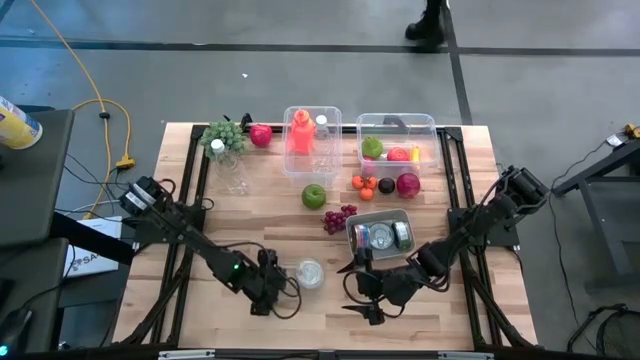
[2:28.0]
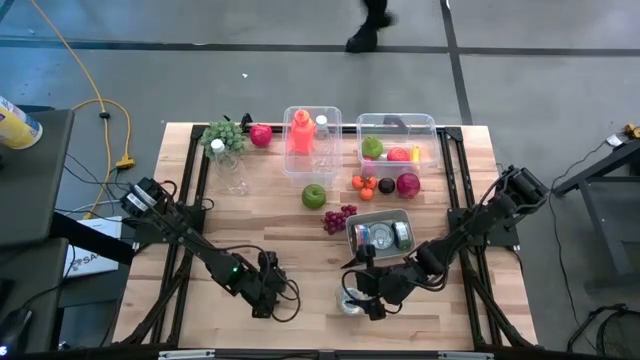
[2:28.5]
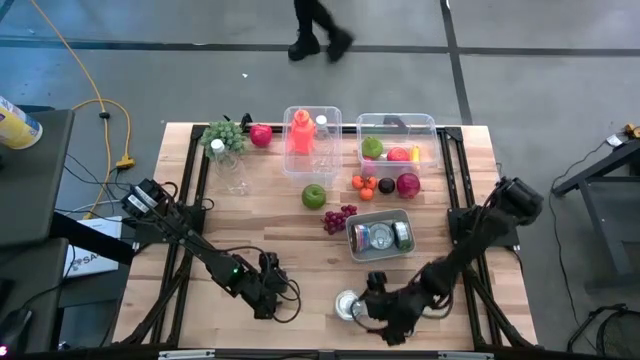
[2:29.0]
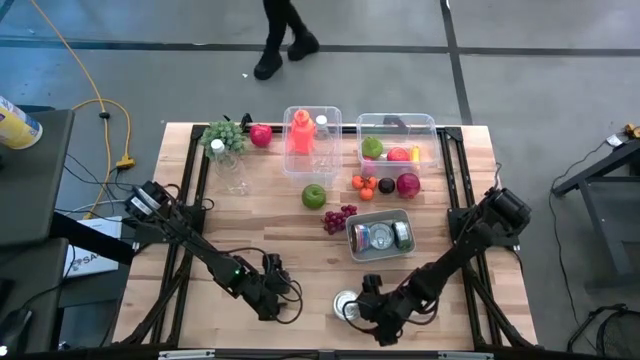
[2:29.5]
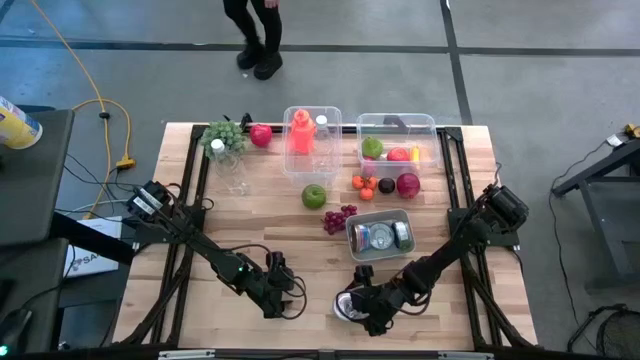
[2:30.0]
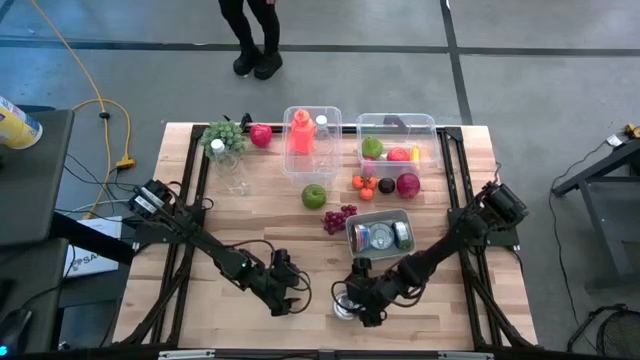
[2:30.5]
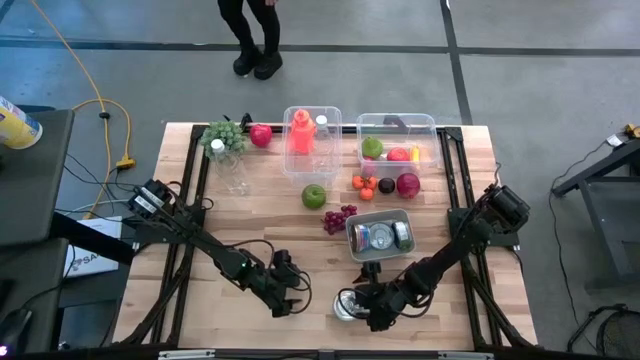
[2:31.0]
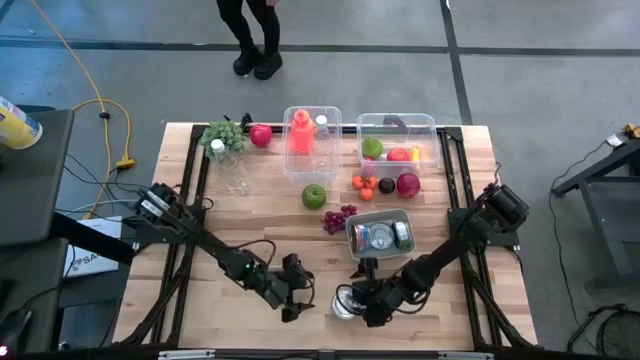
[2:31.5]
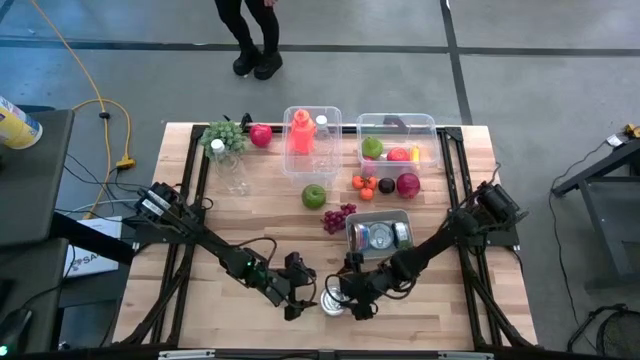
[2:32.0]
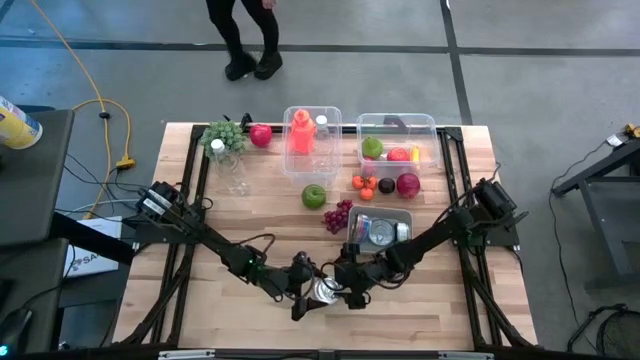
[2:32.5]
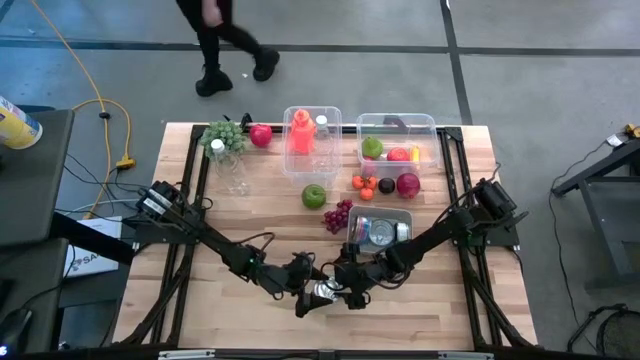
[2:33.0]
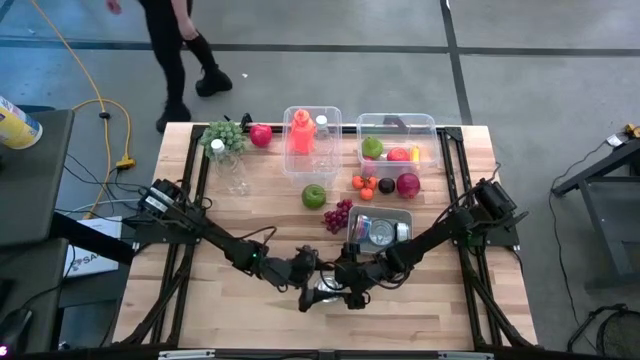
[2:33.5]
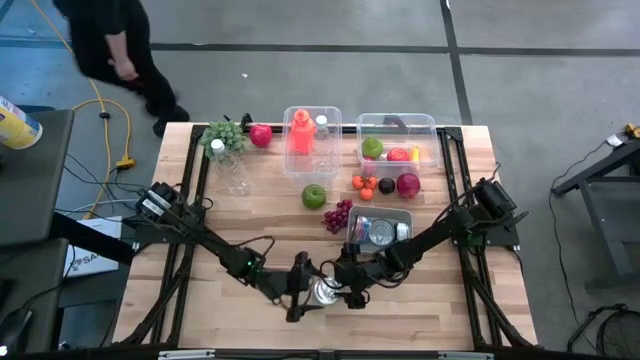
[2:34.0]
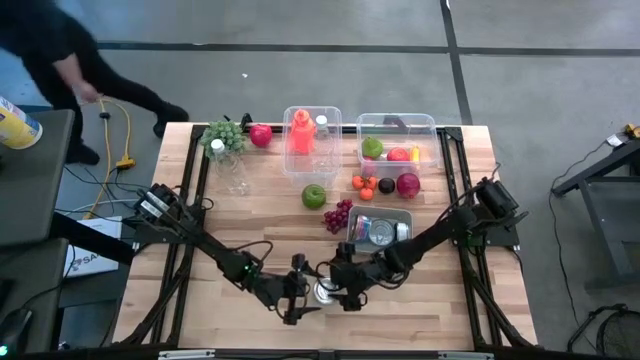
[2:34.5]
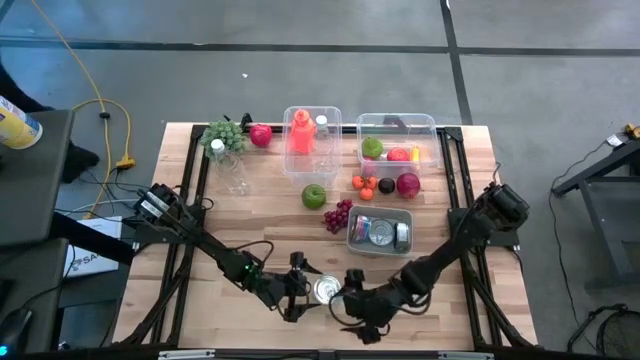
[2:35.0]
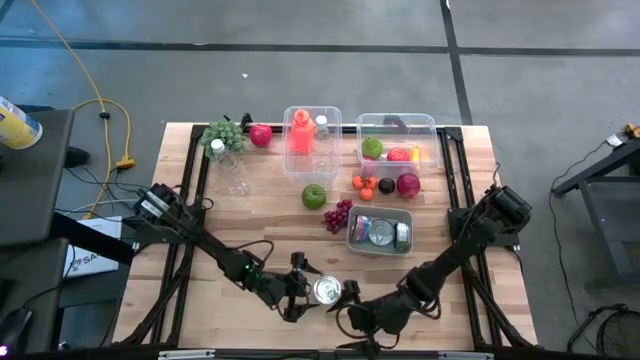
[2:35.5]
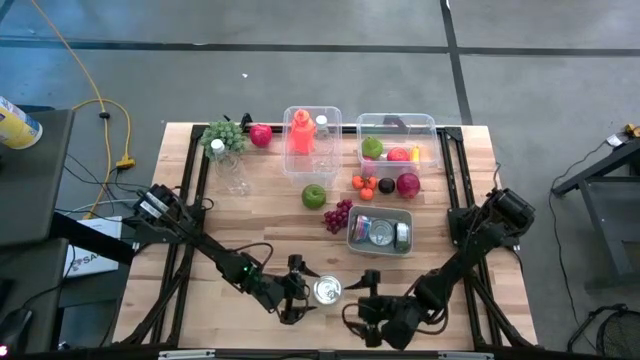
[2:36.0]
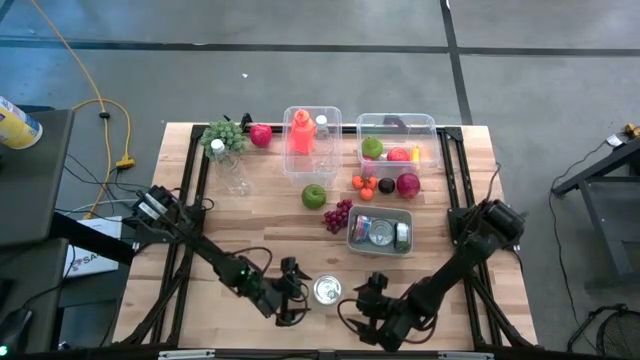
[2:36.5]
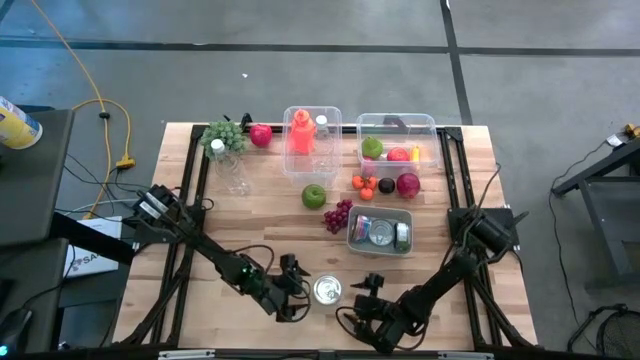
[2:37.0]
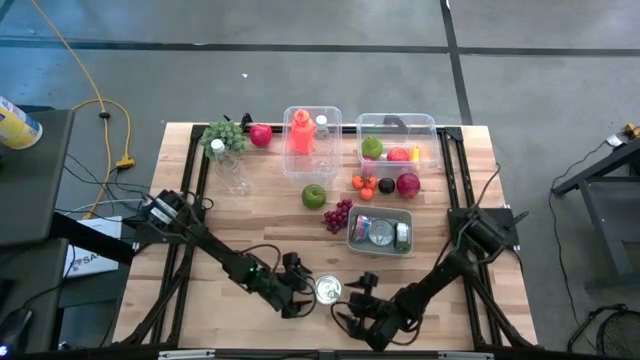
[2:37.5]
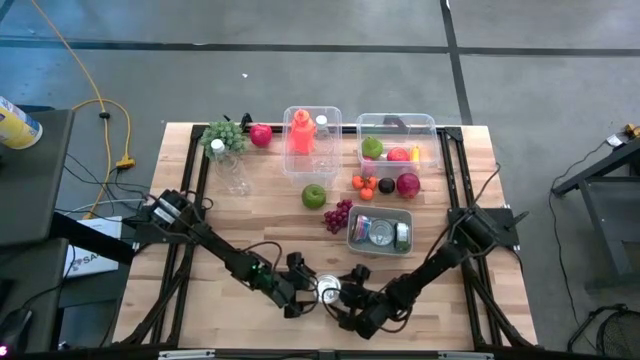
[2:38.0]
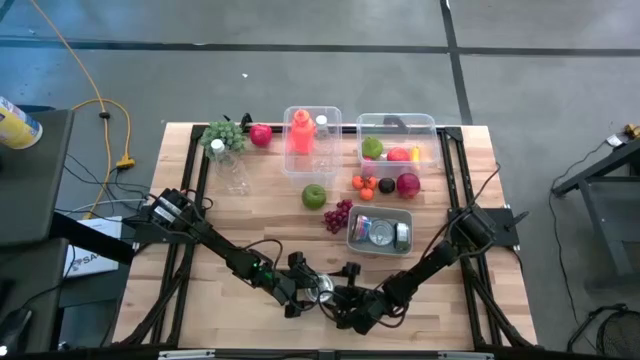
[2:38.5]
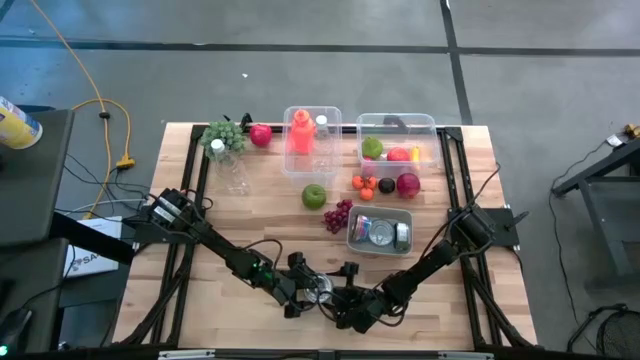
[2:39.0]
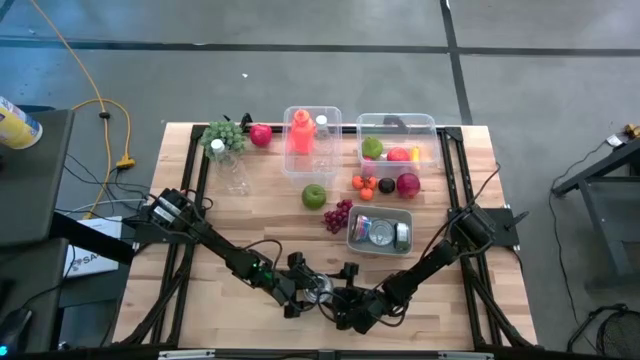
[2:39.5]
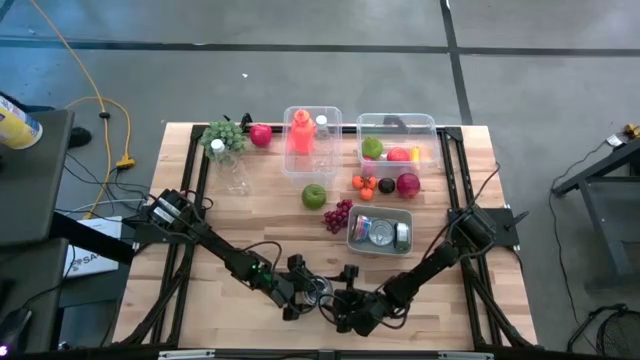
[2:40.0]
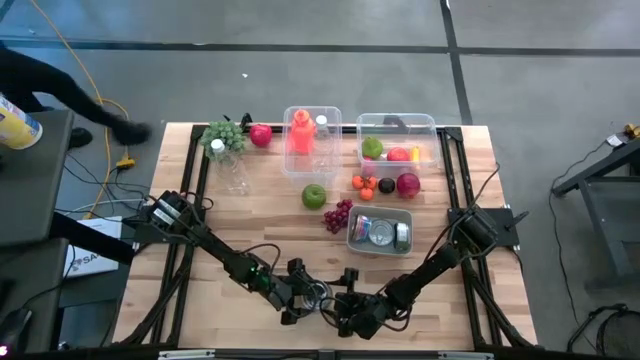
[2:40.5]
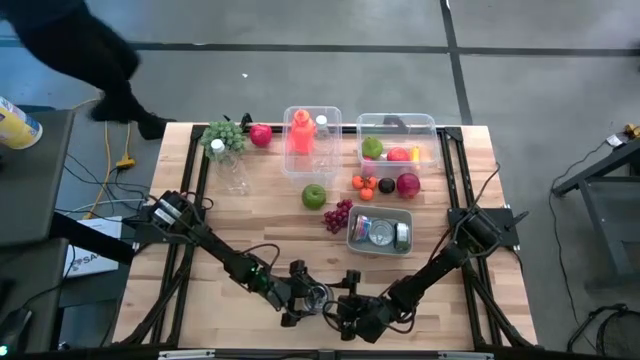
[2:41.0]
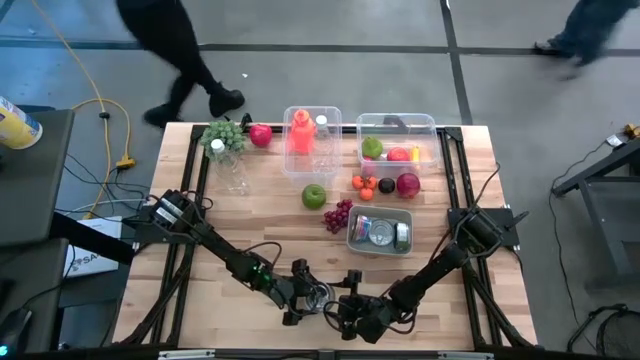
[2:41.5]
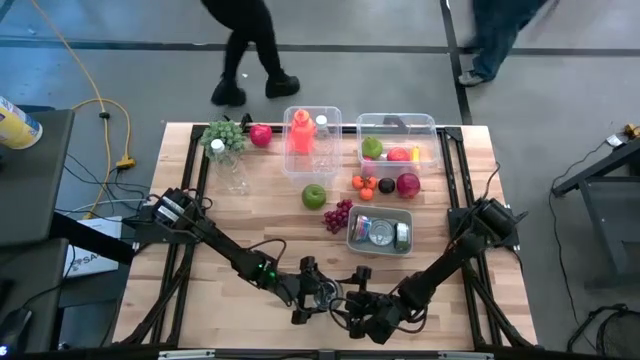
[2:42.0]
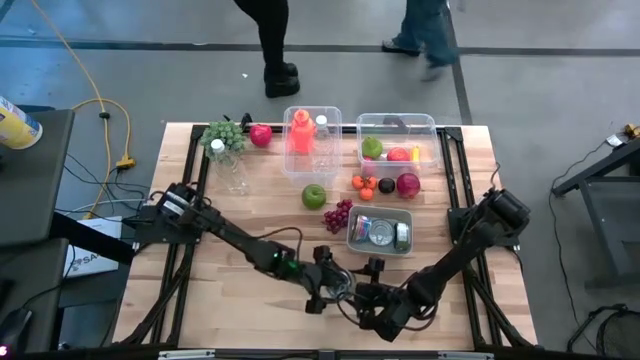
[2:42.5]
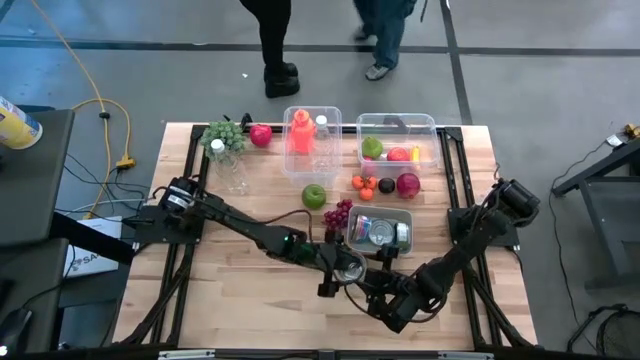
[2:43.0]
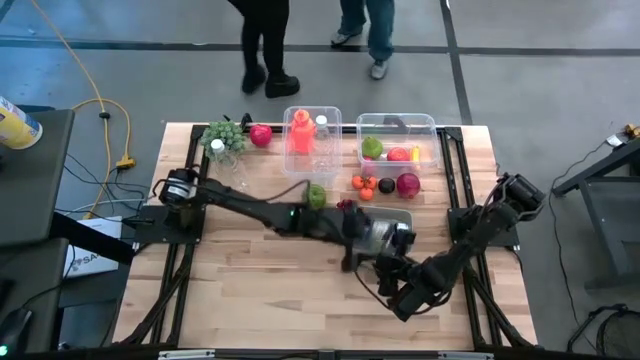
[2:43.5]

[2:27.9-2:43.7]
Task: Pick & Place Food Item
Put the green tuna can into the gray bin

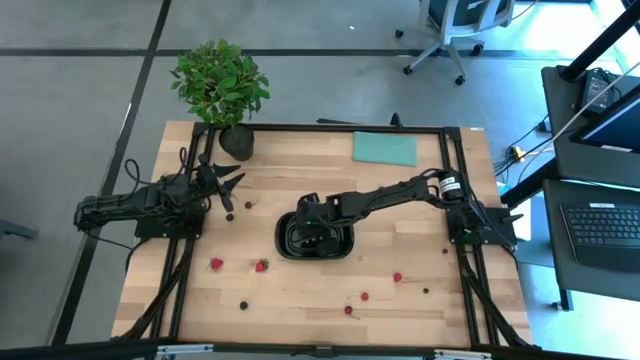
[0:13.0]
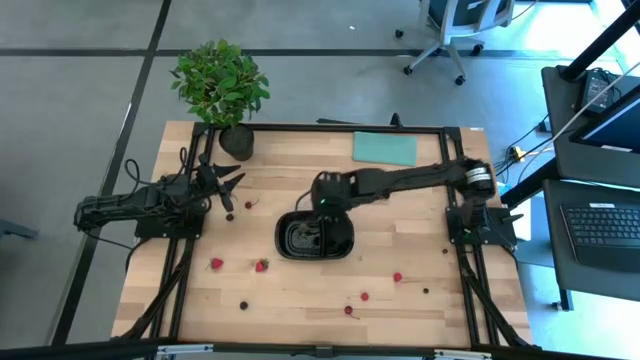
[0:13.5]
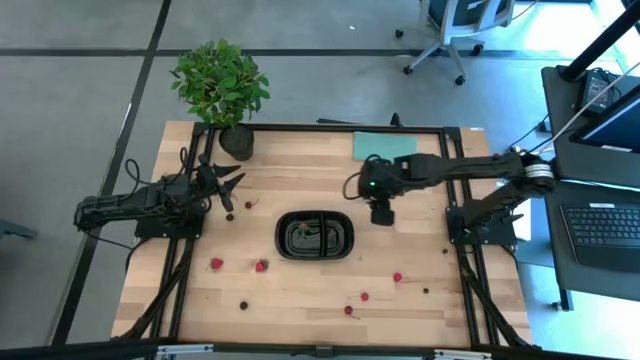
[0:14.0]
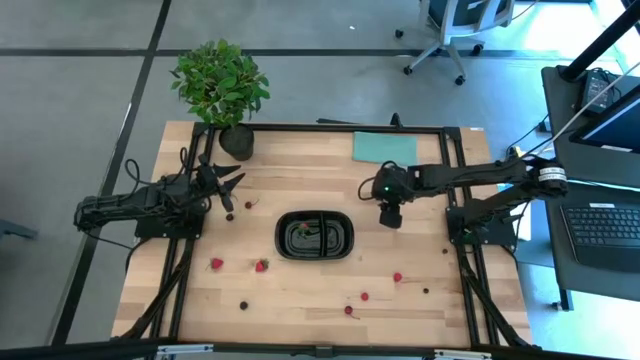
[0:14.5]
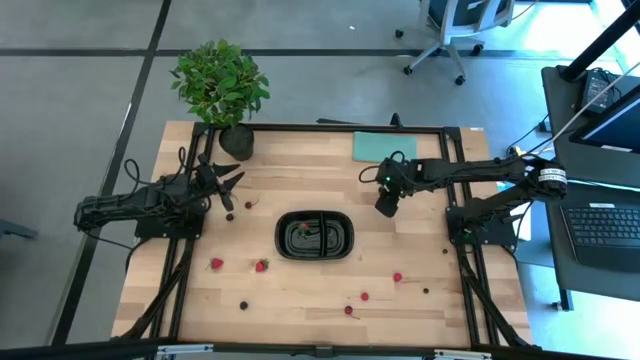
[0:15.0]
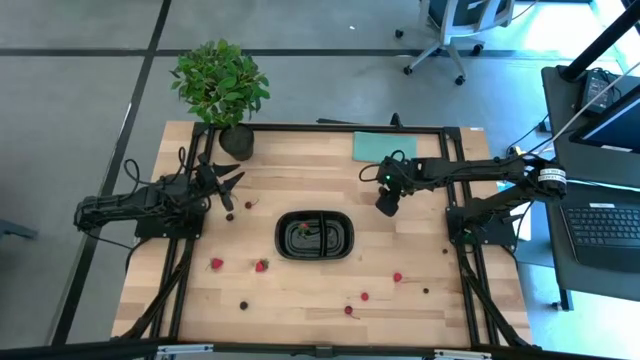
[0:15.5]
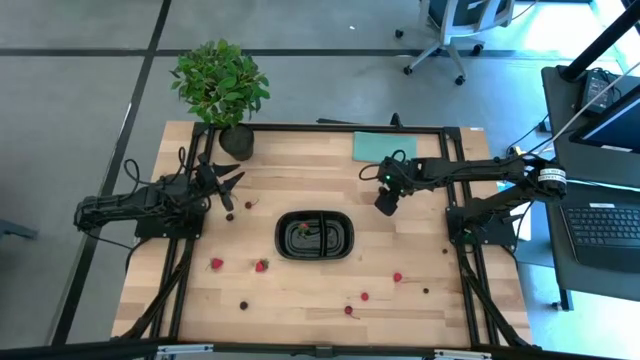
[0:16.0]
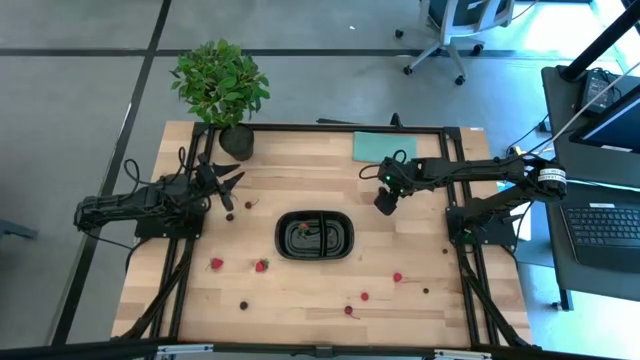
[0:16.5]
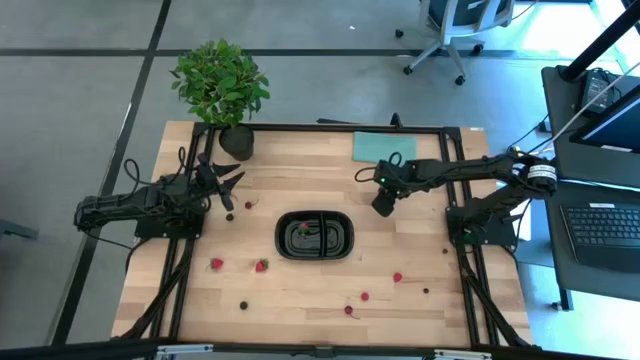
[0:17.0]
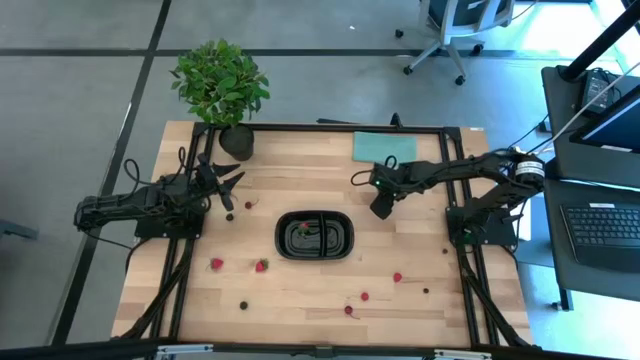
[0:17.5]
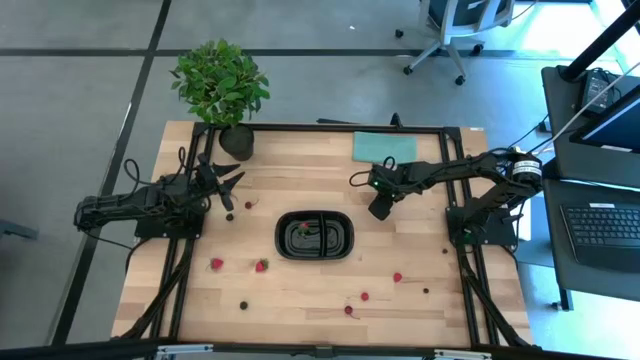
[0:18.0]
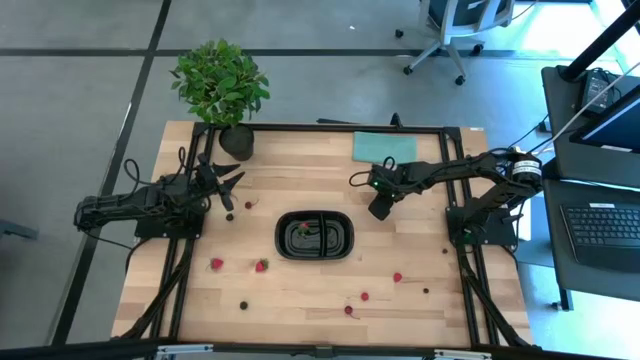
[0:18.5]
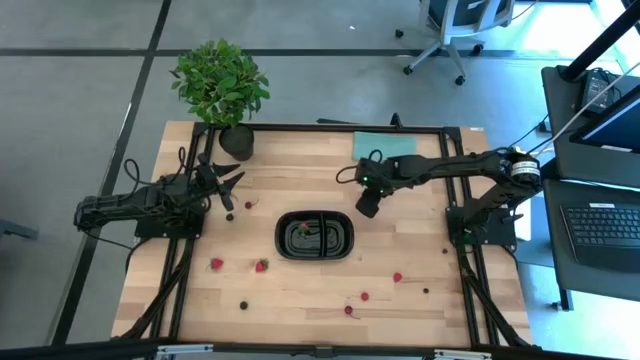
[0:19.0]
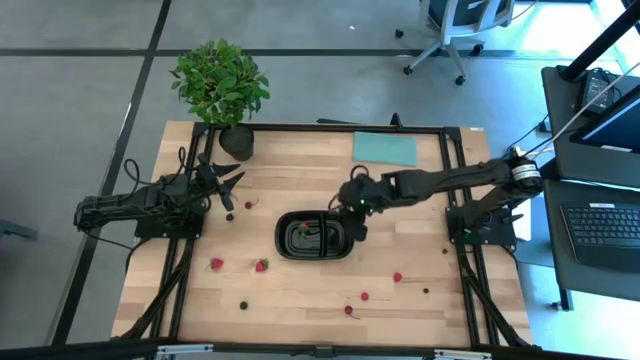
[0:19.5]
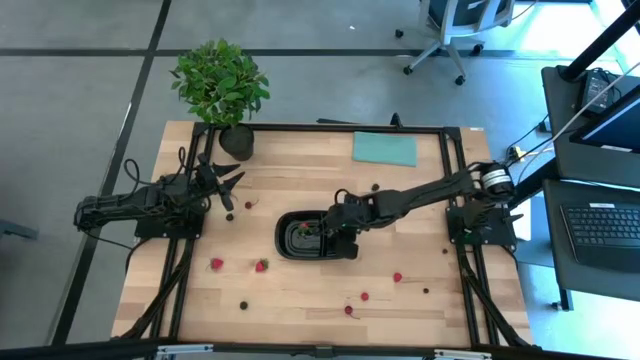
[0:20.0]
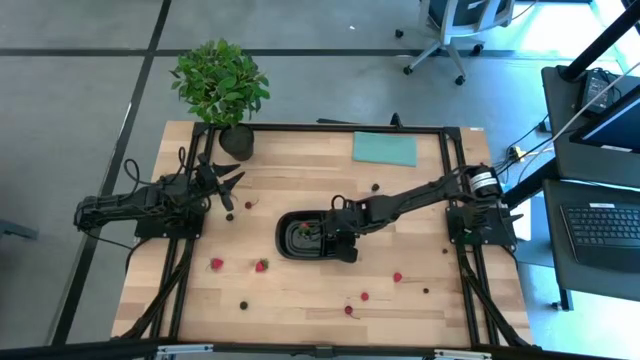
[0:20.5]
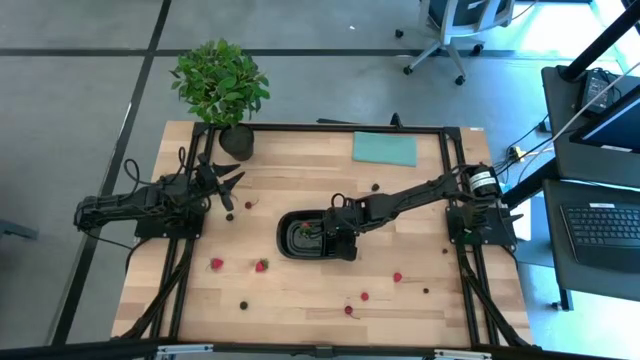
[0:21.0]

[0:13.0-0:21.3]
Task: Pick and placing Produce into tupperware
Put the top black cherry into the right section of the black bin
